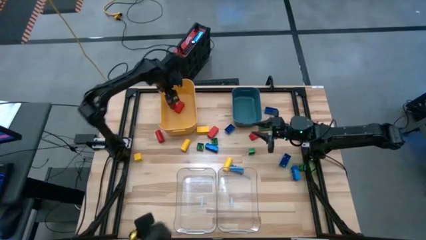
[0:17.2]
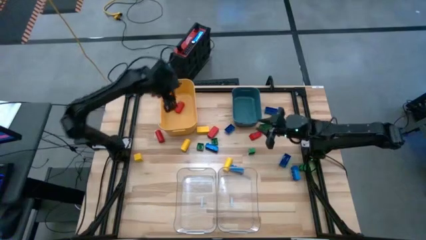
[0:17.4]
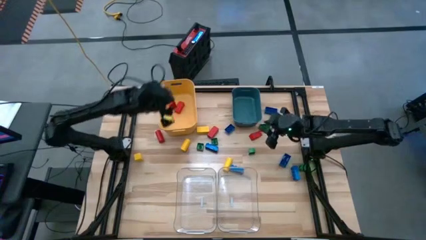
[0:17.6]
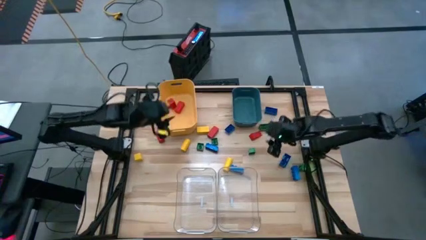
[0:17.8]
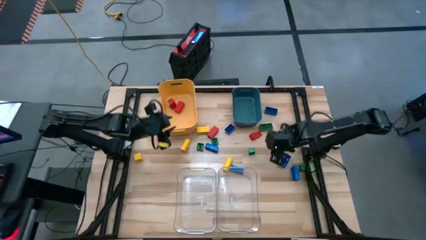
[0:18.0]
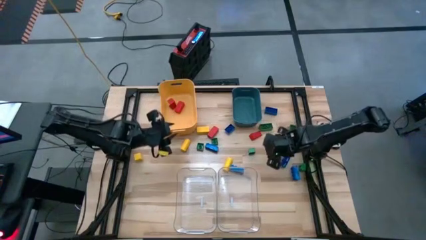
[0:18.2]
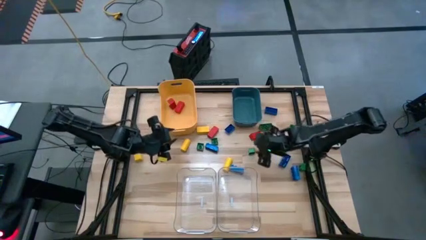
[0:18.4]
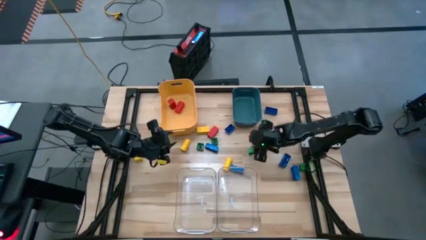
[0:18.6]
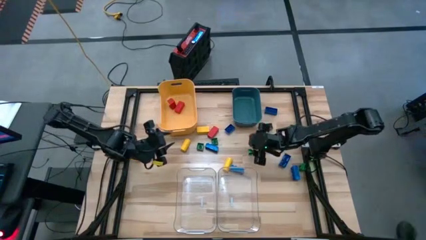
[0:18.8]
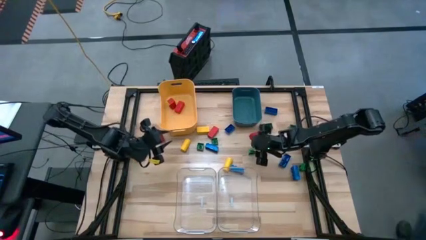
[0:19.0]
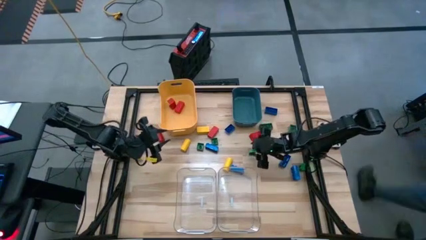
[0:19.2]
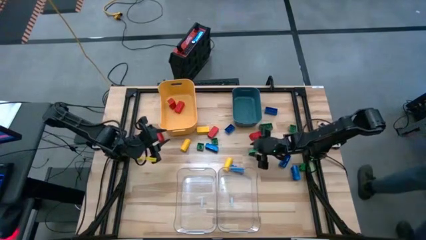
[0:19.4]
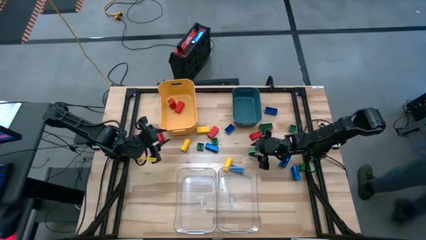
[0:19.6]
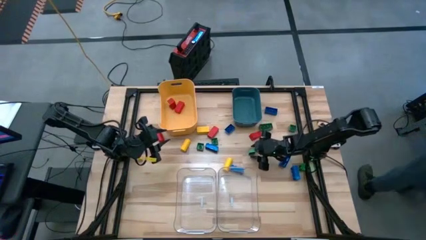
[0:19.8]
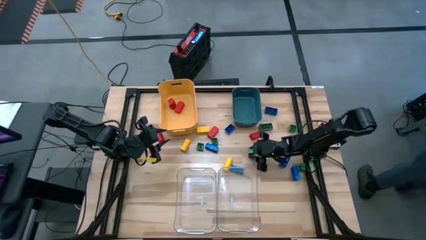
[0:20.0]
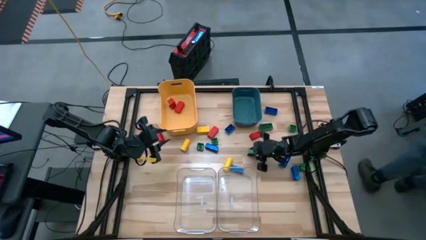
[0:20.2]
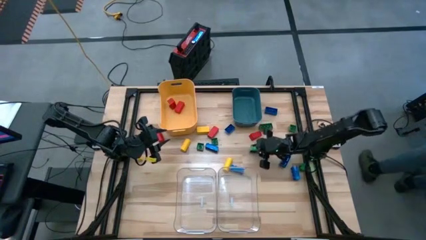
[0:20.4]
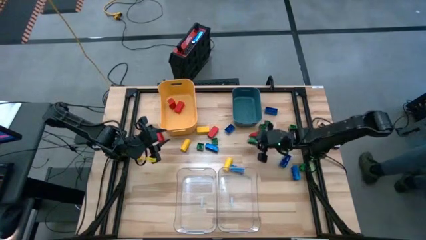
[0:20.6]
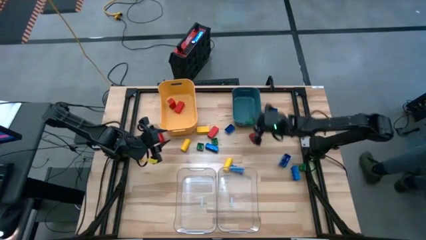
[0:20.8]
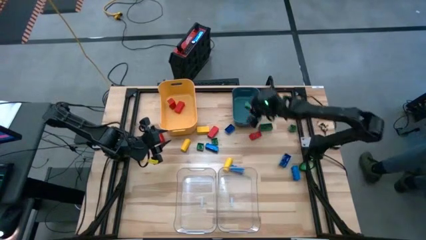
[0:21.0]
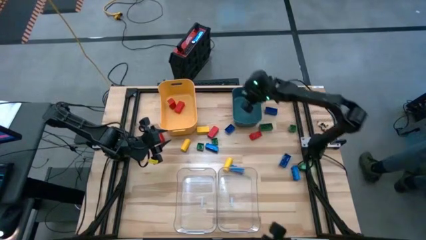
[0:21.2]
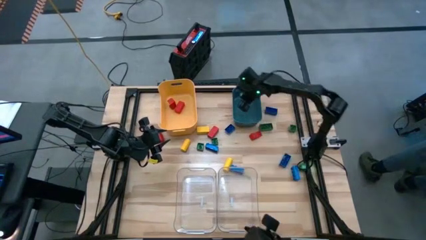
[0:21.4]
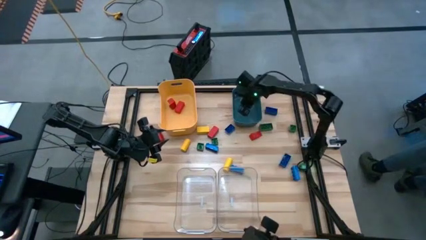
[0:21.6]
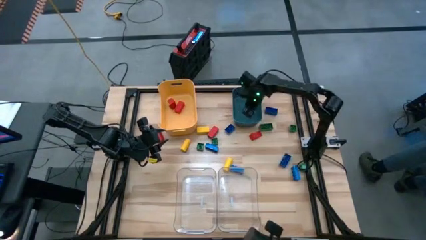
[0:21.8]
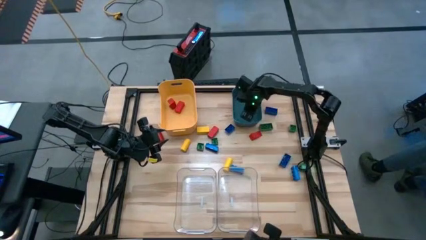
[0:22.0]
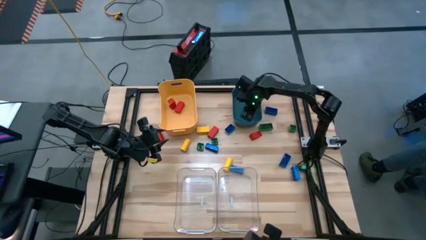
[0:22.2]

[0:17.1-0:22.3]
Task: Sort blocks
Put the green game piece into the blue bin

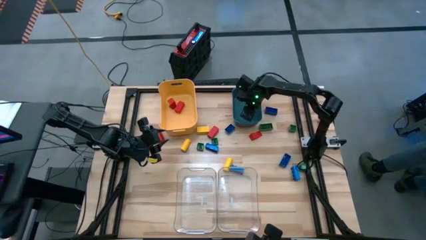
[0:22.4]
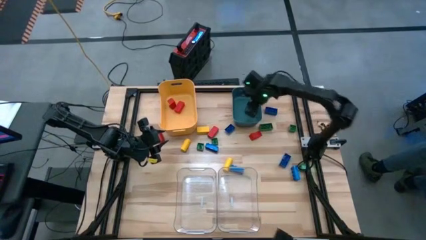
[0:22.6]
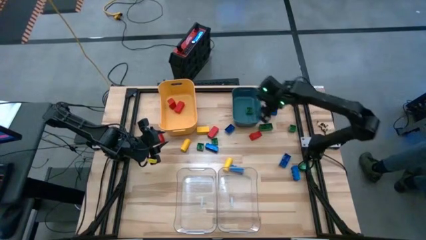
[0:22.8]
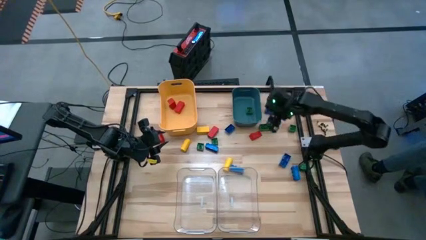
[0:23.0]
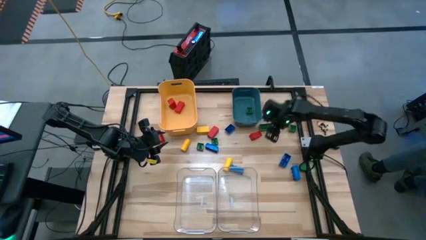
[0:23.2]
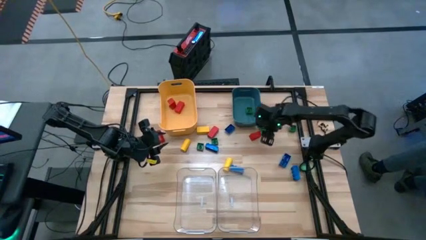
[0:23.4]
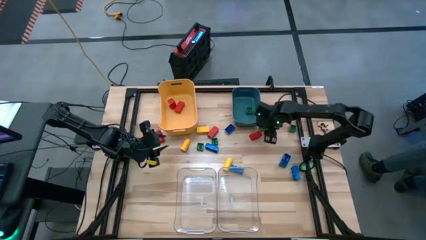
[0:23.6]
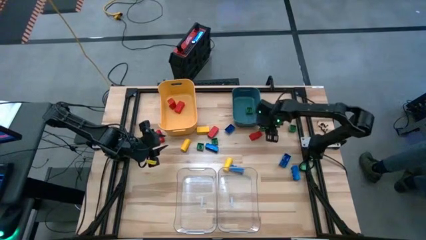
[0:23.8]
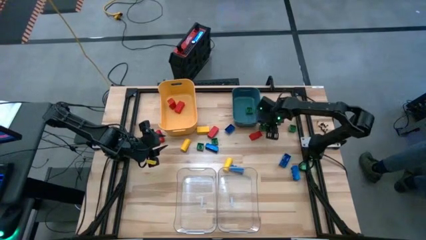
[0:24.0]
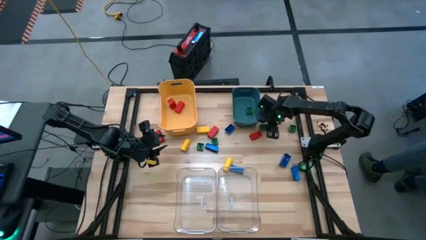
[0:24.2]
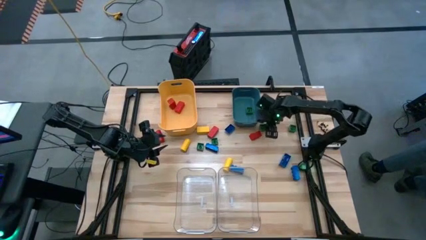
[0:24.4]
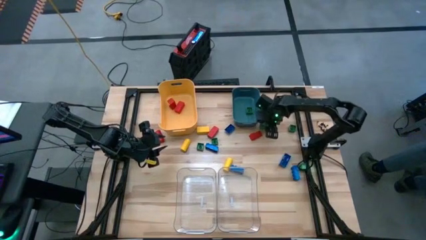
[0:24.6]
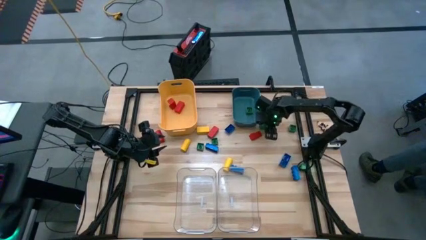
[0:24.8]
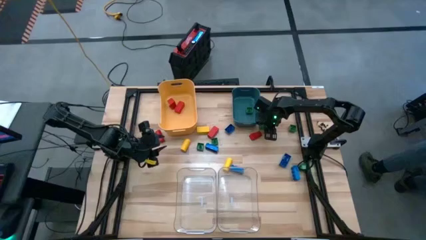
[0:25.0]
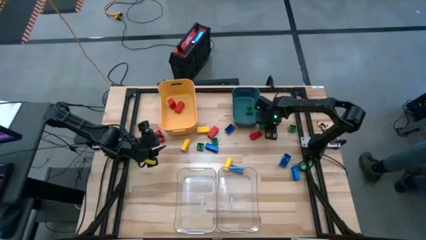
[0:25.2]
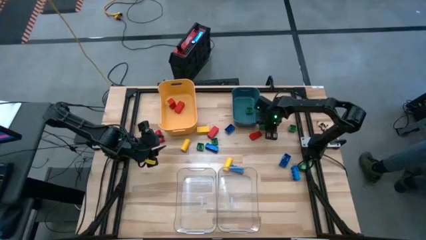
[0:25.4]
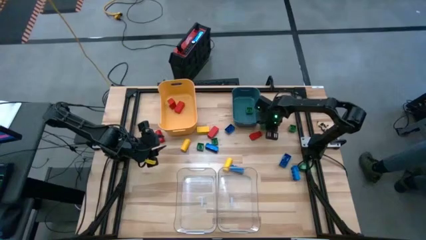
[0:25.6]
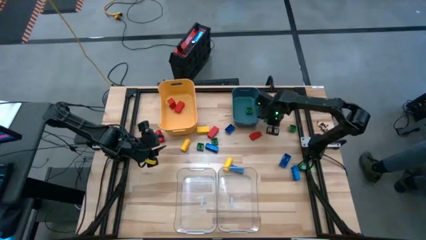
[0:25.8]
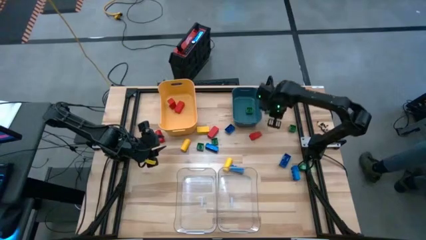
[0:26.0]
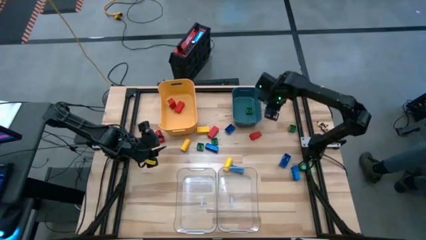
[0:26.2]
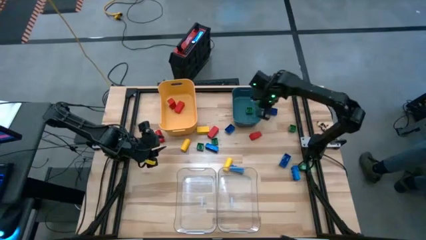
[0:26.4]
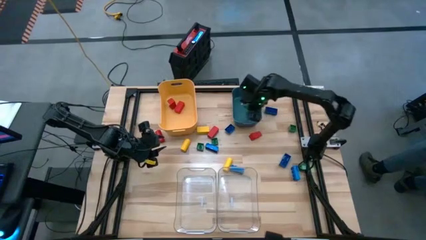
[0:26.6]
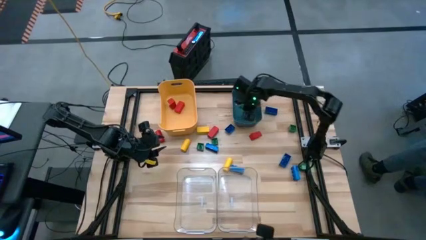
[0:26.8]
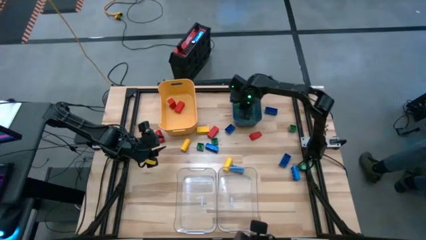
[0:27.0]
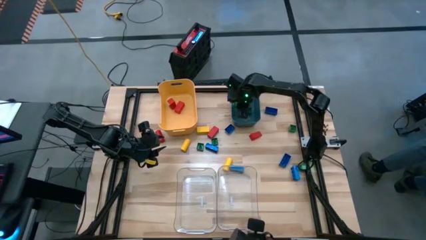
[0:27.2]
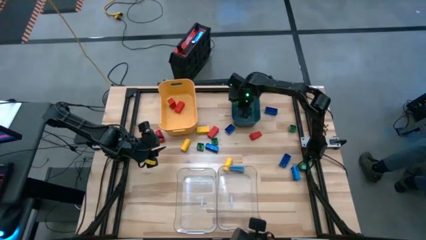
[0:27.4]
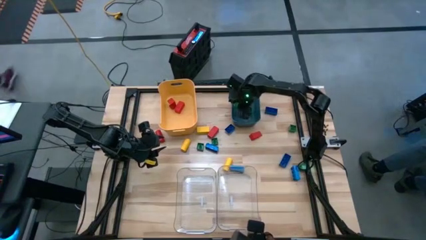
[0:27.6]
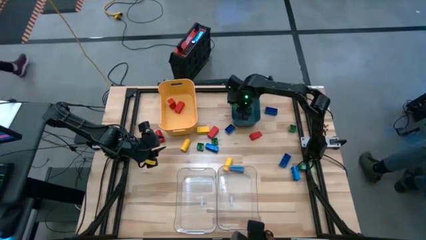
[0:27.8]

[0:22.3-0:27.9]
Put the green game piece into the blue bin

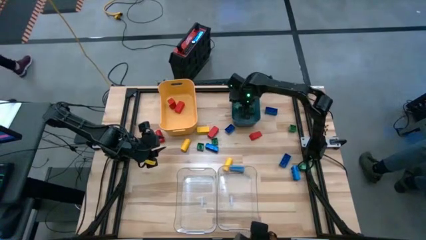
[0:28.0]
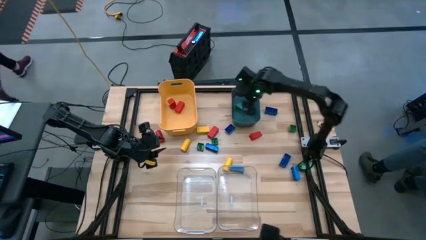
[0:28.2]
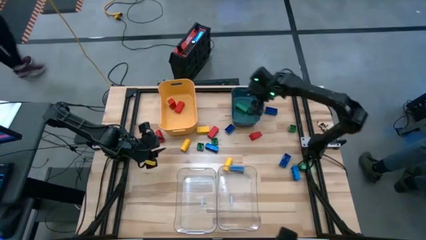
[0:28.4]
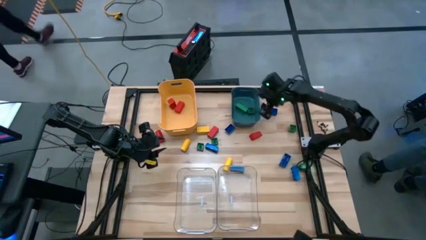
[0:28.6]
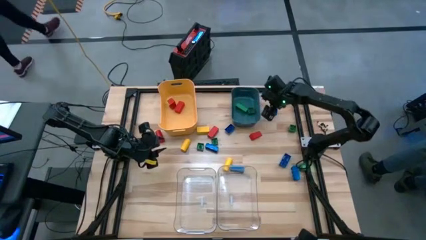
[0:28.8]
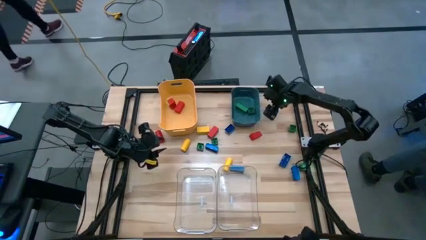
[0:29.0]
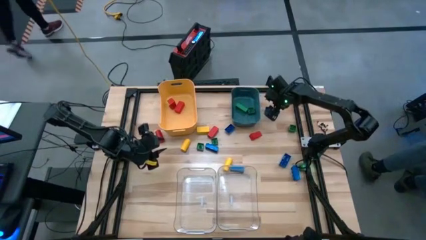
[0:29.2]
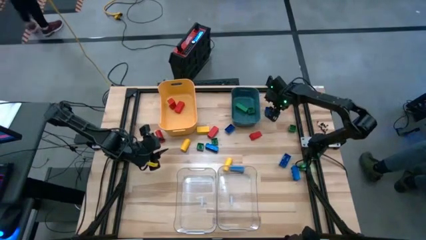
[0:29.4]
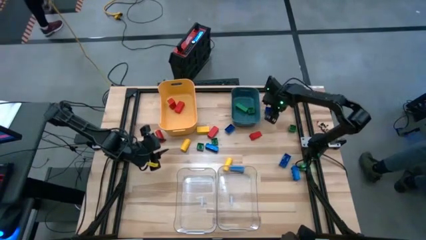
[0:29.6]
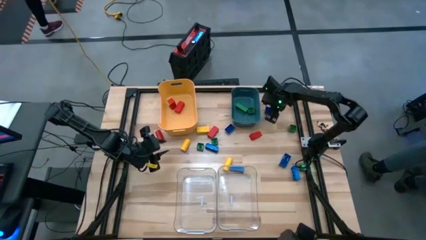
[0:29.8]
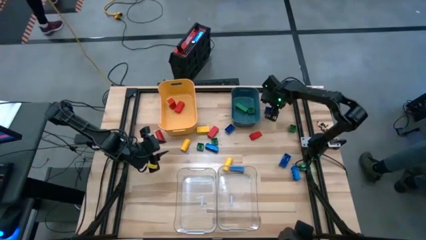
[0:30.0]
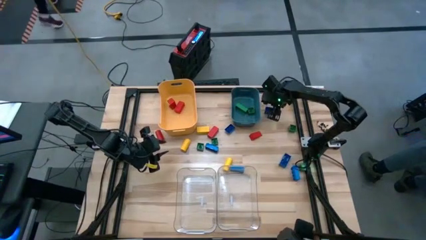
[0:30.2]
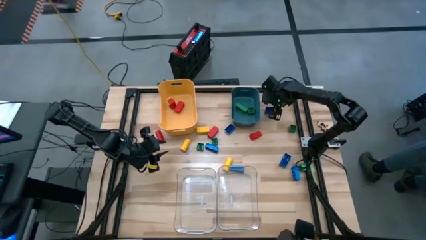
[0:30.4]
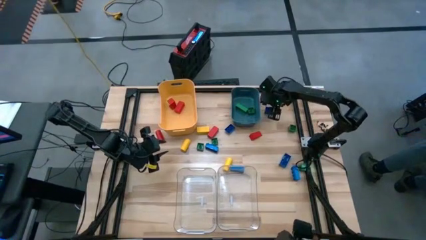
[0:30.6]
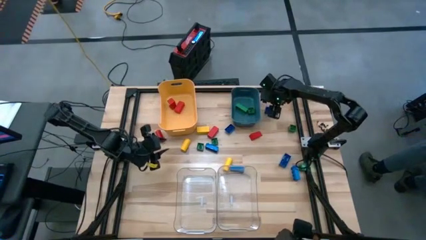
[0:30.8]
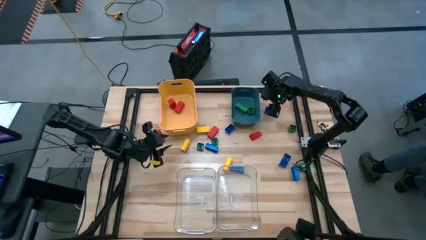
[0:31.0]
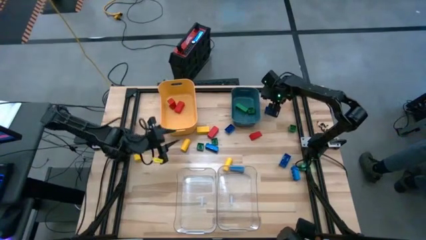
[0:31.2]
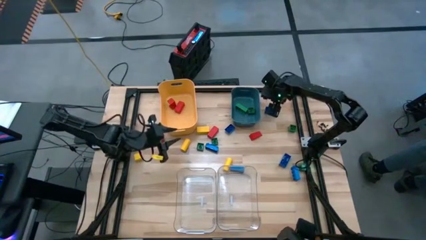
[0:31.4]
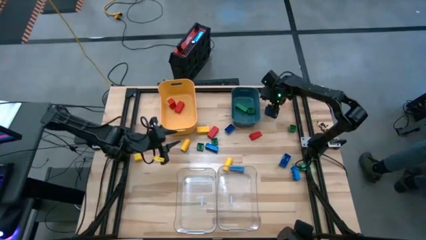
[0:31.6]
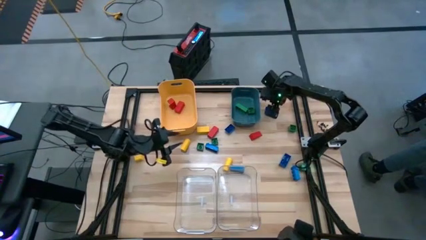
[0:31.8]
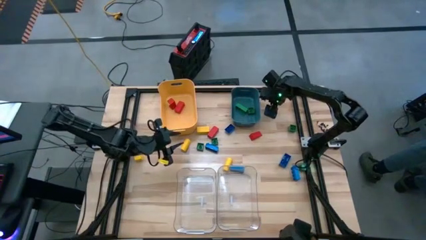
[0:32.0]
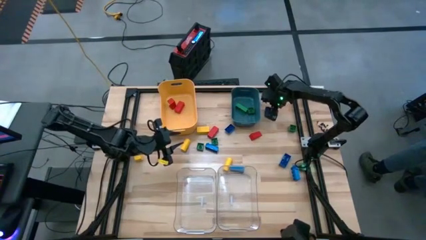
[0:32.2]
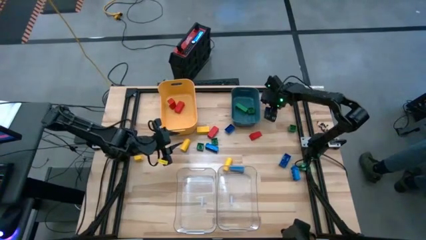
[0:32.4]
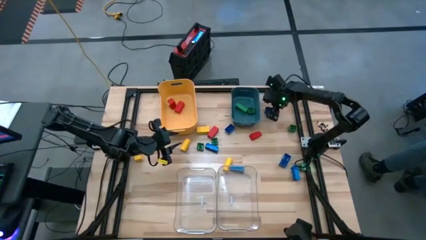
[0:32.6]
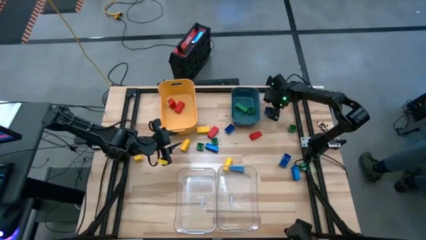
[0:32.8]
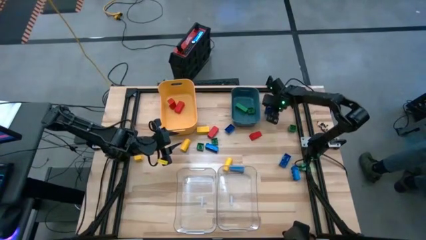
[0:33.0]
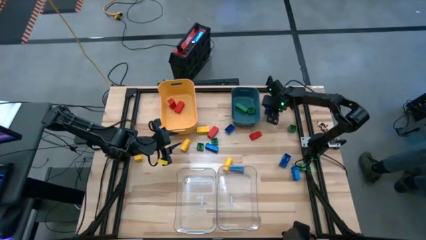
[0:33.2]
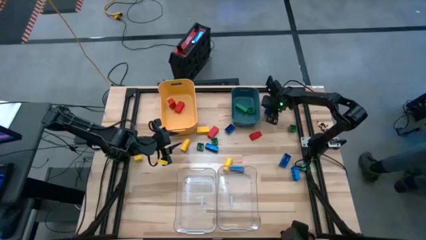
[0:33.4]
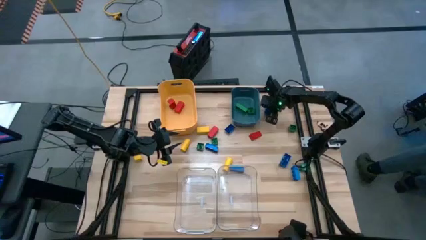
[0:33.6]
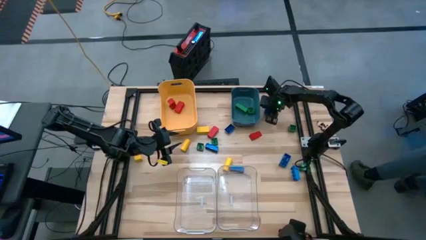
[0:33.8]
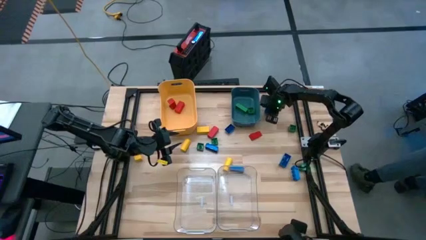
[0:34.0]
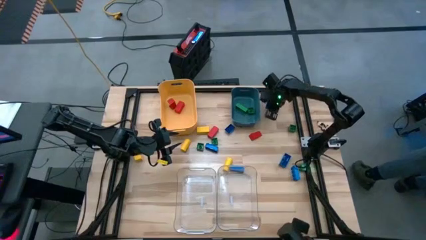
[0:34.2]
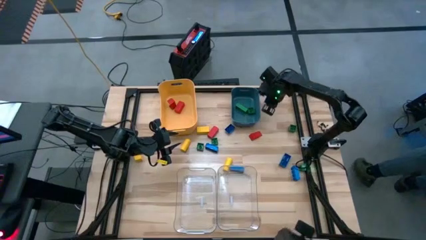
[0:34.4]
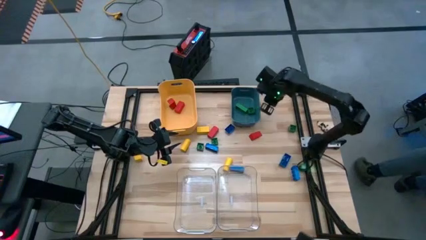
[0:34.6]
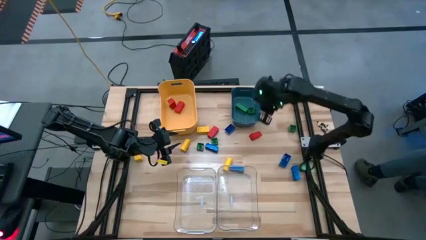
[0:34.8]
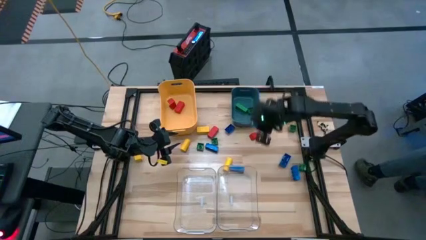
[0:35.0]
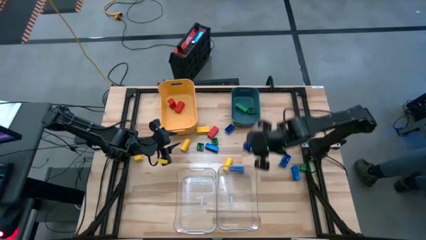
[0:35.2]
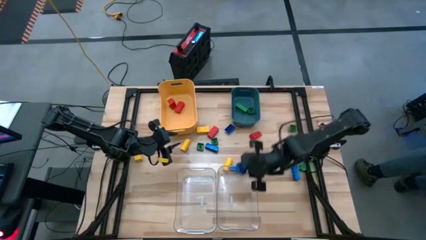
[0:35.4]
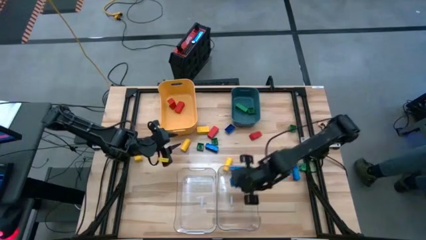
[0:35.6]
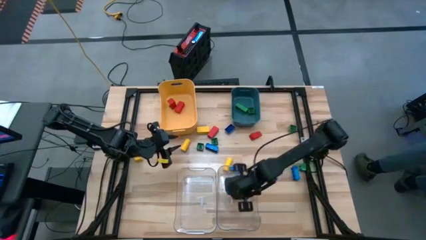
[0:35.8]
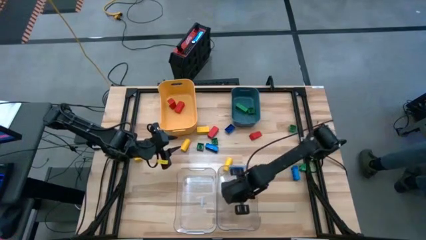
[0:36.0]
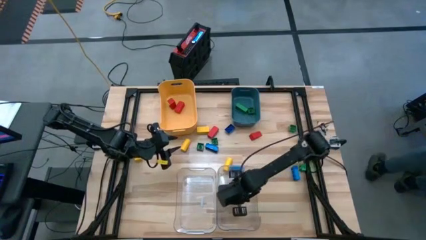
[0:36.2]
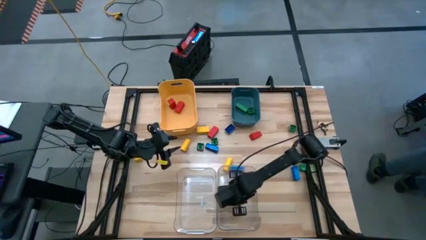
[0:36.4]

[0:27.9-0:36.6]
Put the blue game piece into the right transparent bin
